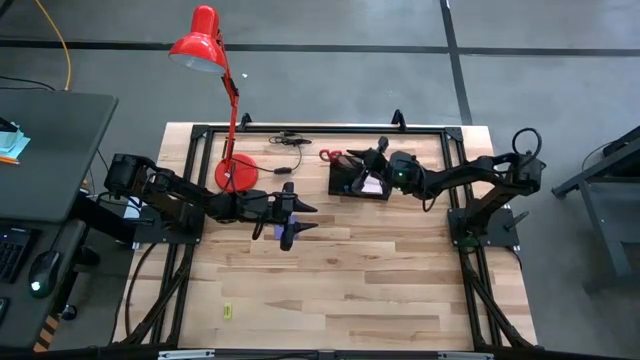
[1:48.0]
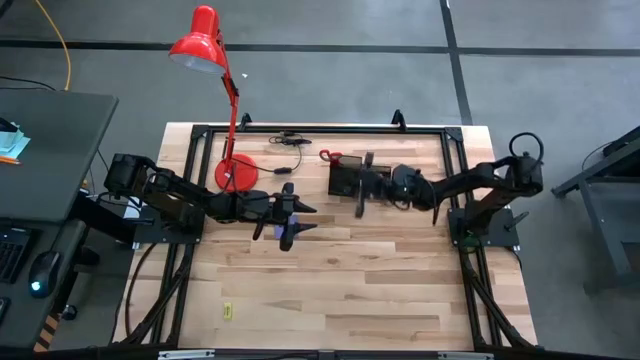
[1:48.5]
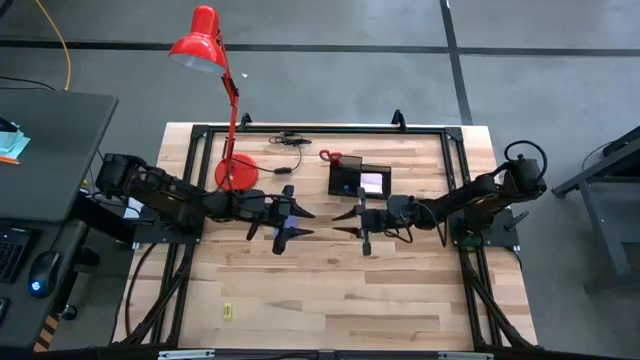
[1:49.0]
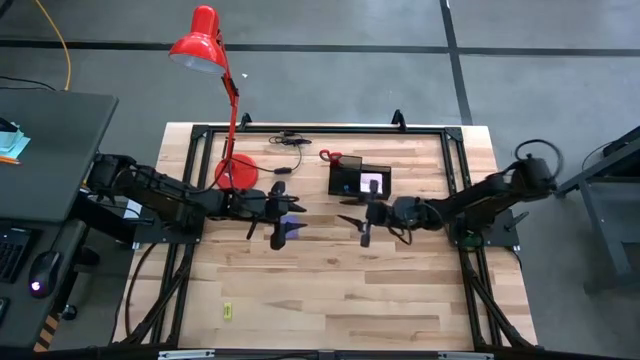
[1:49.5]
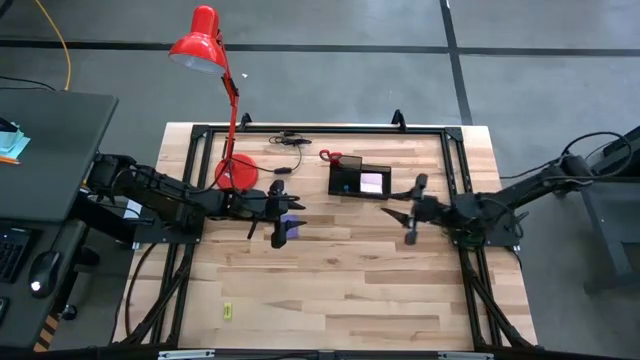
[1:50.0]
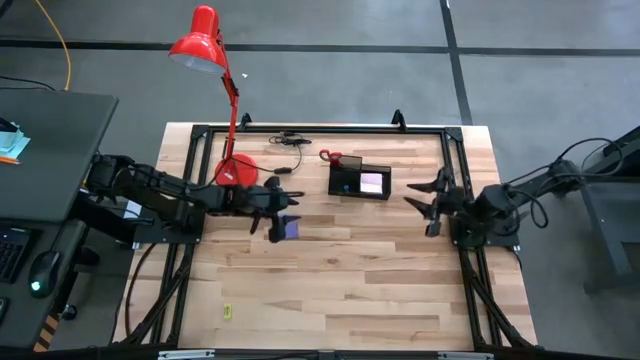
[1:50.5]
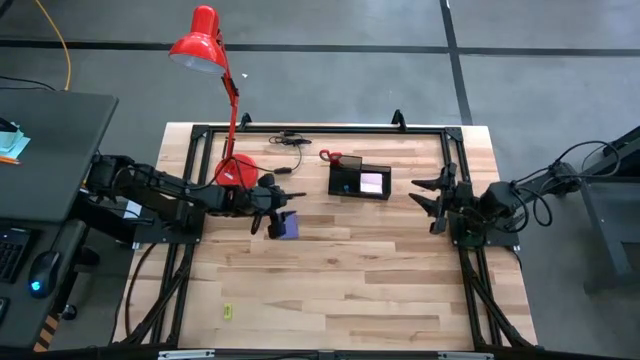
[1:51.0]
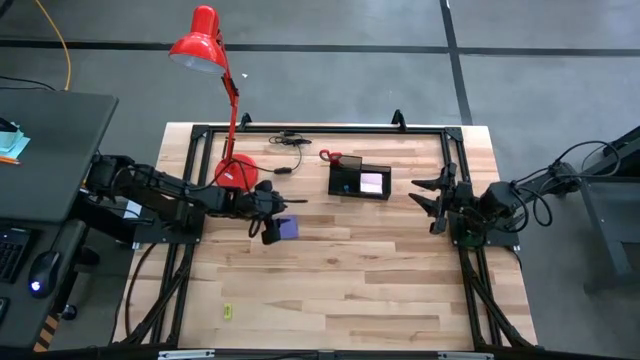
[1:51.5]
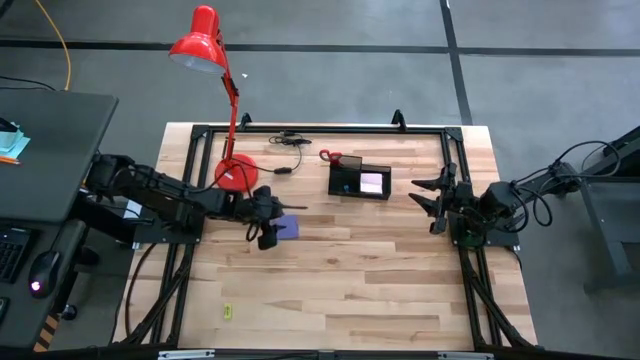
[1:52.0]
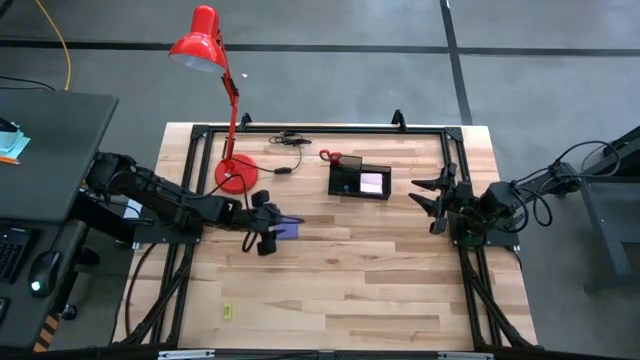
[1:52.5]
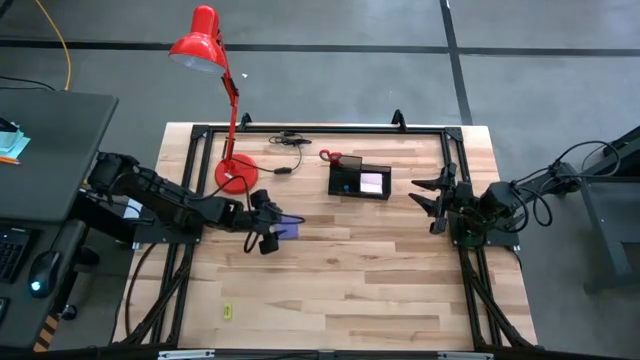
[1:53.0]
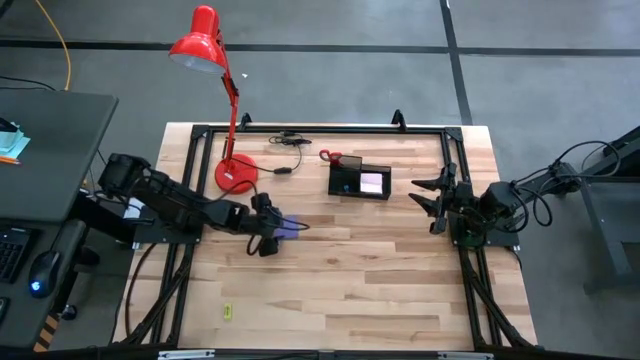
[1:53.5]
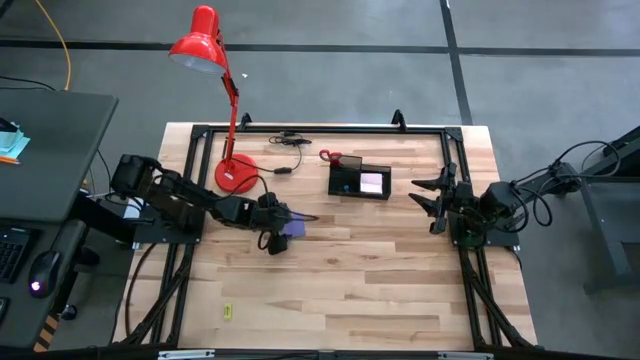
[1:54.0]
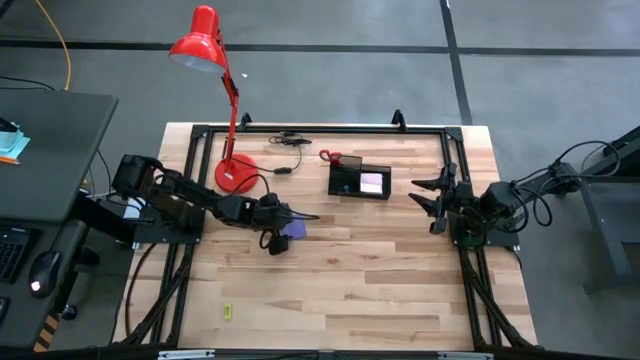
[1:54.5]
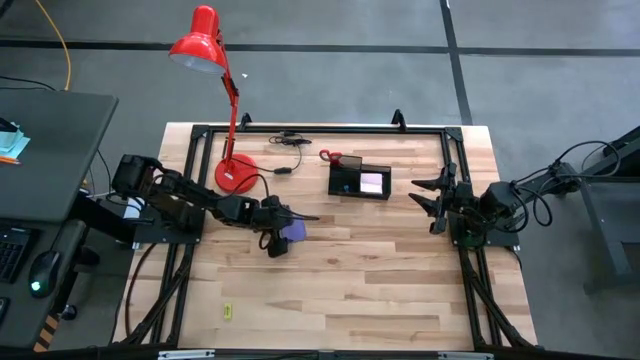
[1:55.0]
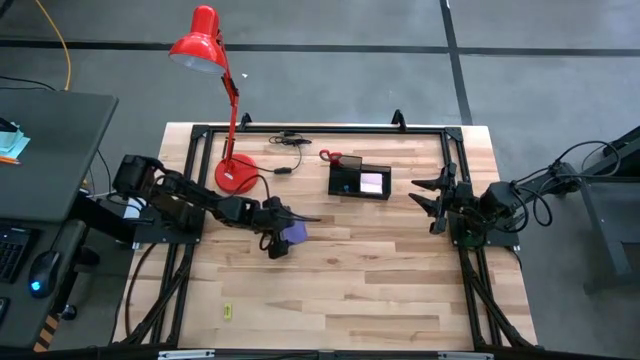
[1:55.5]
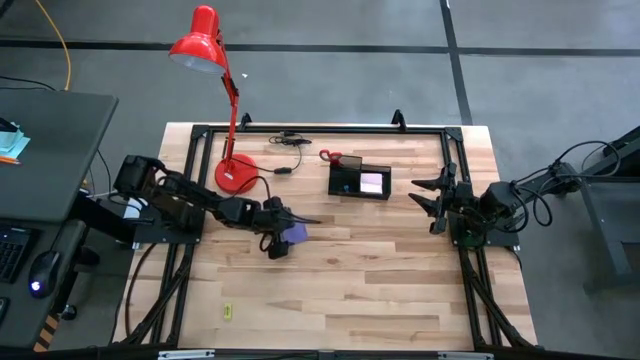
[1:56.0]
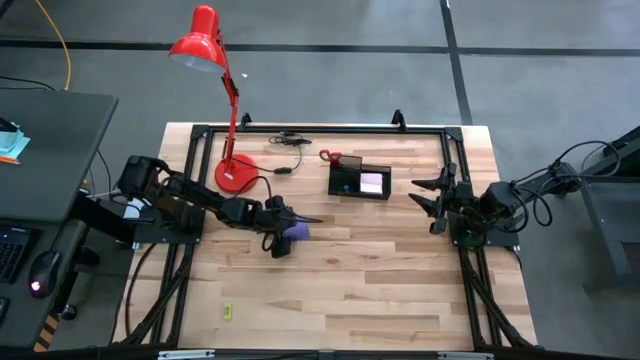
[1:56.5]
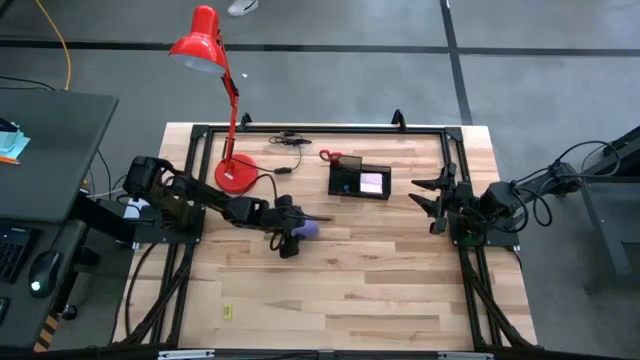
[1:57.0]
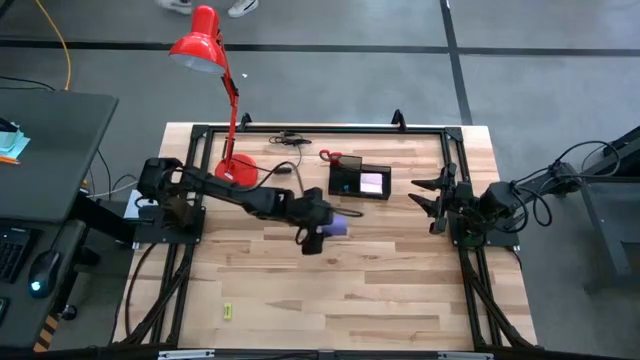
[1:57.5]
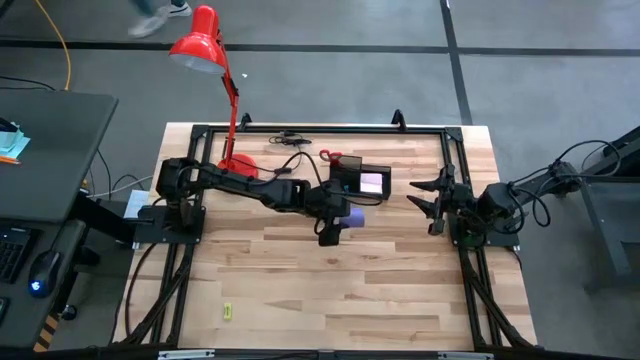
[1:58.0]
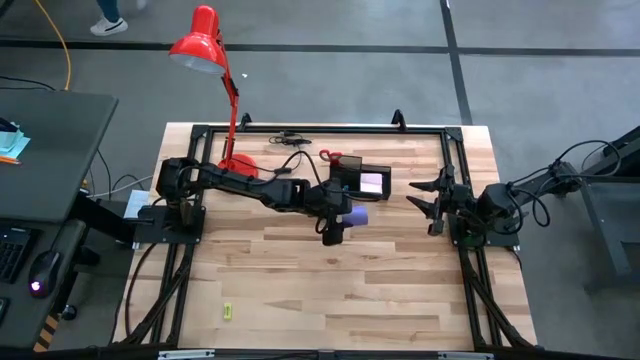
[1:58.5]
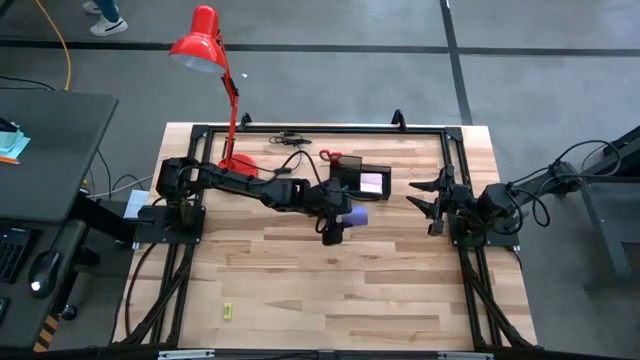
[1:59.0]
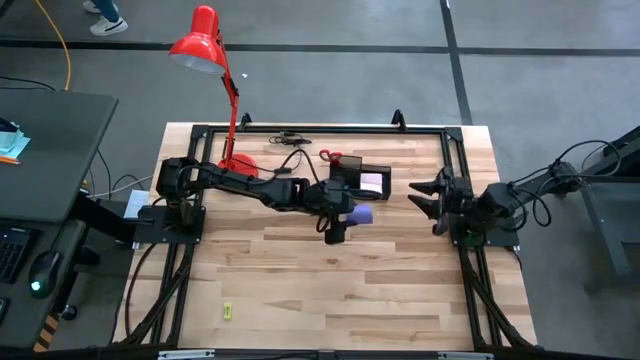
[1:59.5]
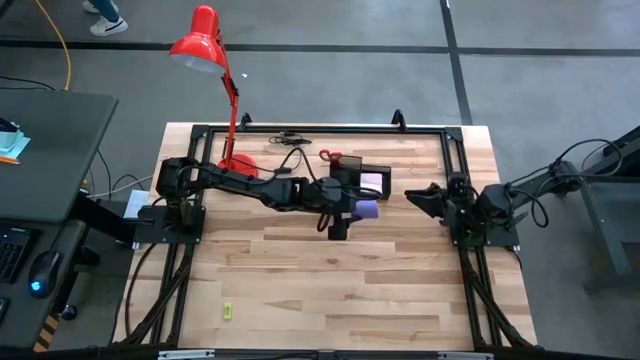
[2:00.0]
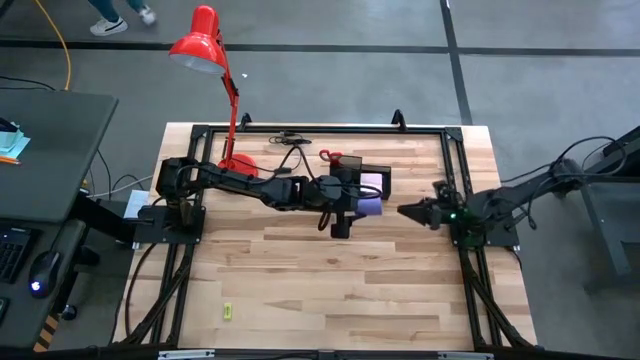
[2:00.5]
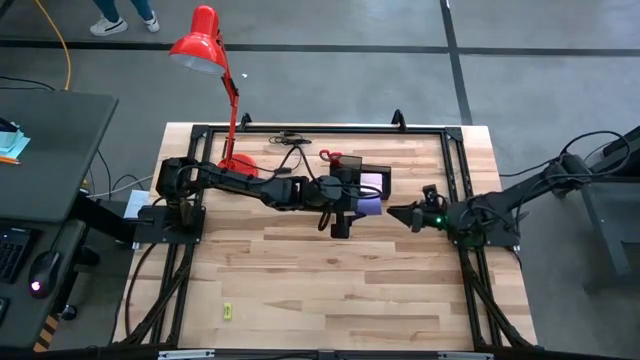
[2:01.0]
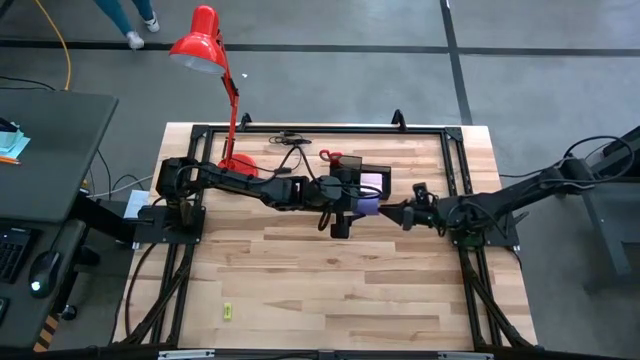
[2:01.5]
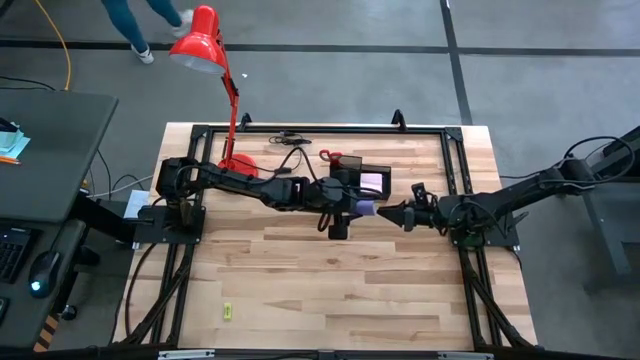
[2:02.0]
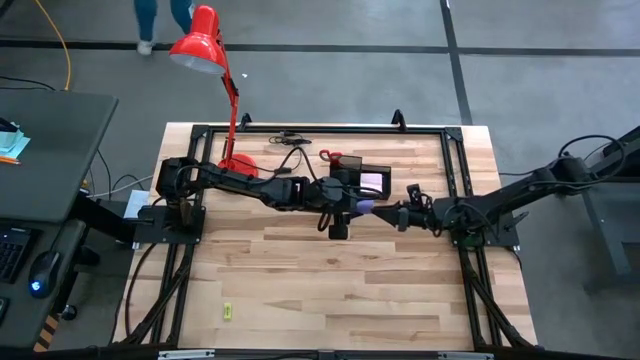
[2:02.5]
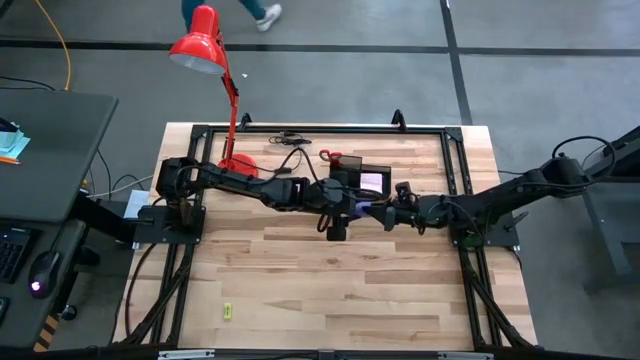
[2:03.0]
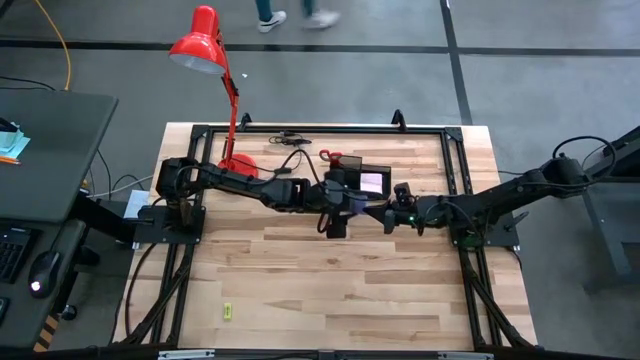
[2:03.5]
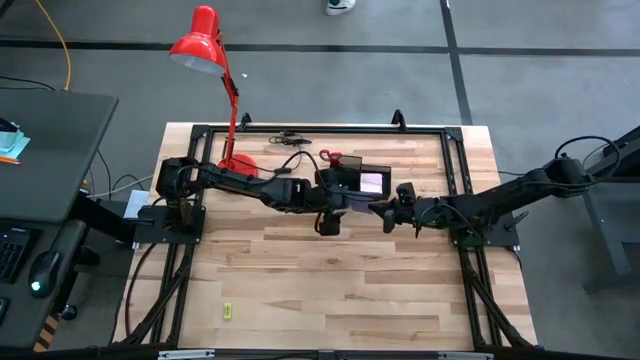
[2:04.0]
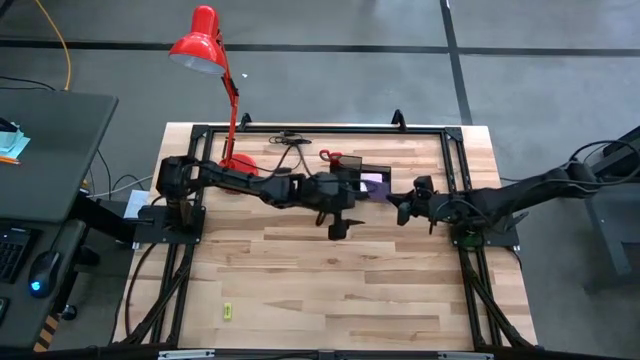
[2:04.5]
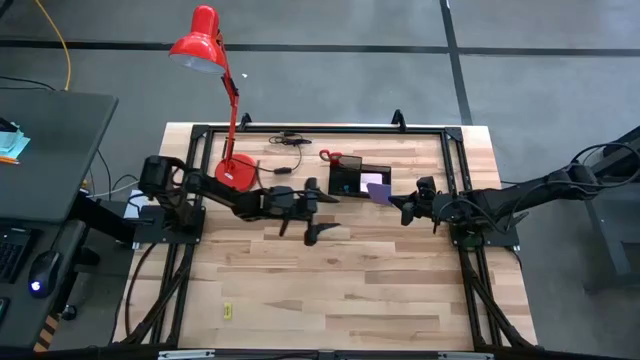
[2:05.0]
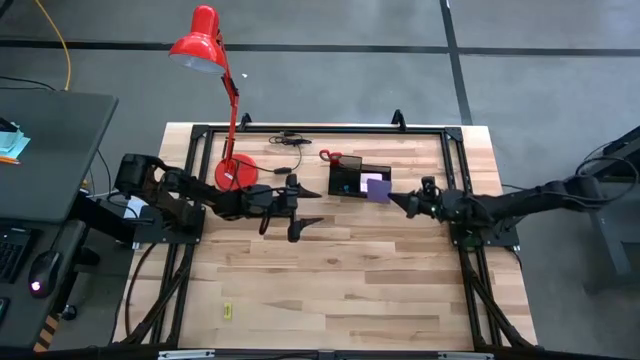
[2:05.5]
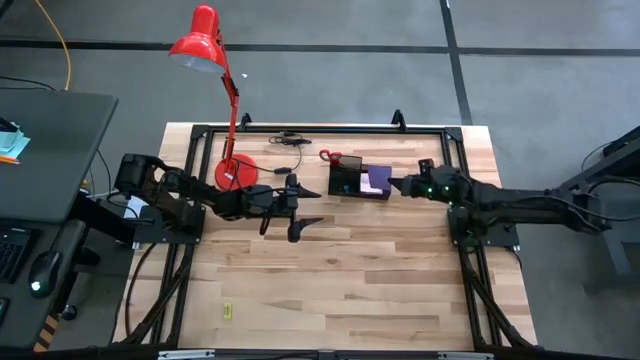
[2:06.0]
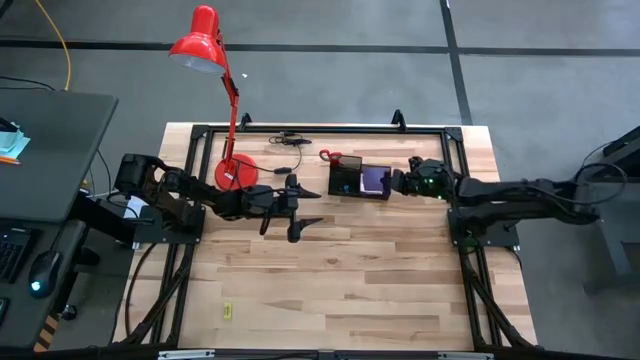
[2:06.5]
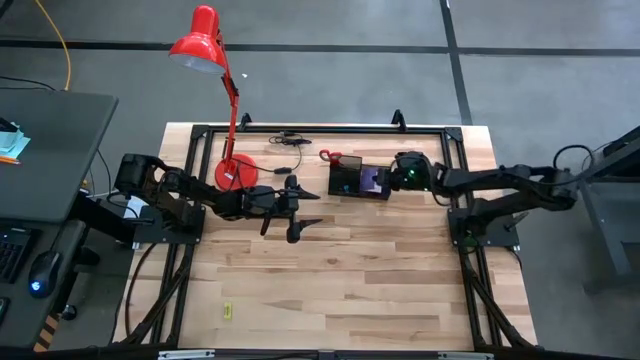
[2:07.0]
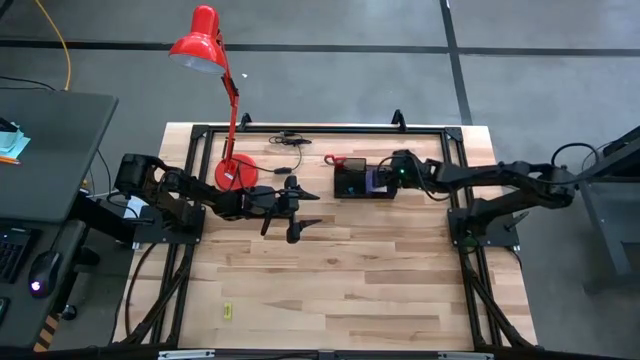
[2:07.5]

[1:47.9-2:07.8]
Task: Pick and place office supplies into organizer
Put the blue sticky note into the black desk organizer
